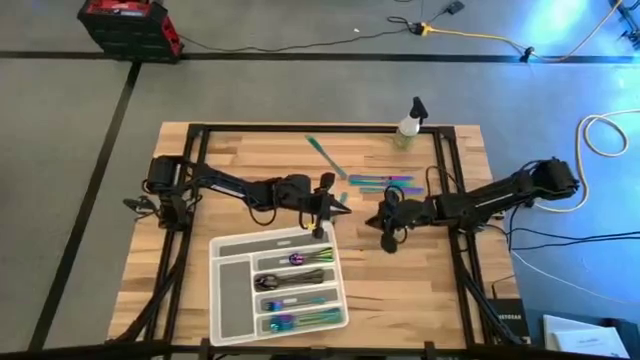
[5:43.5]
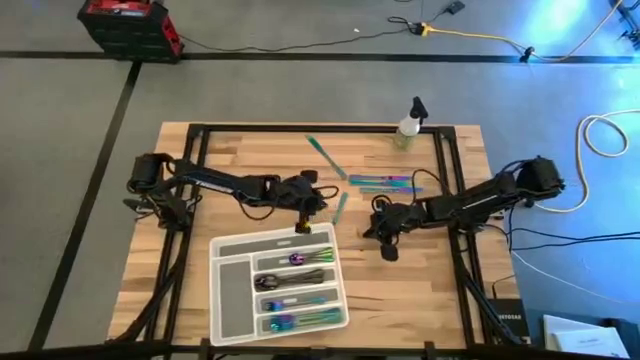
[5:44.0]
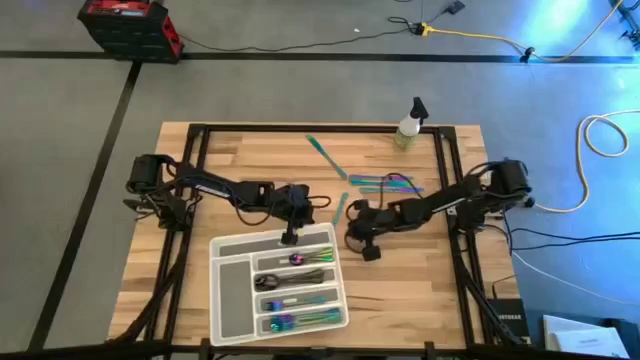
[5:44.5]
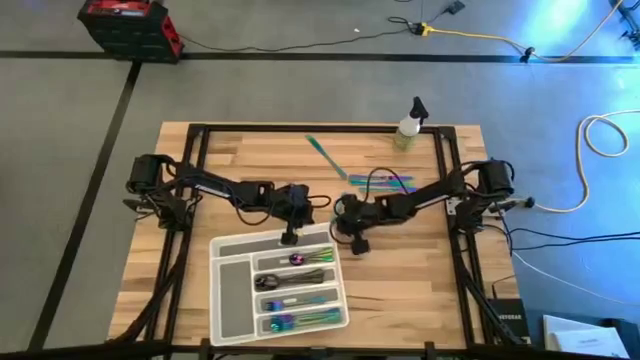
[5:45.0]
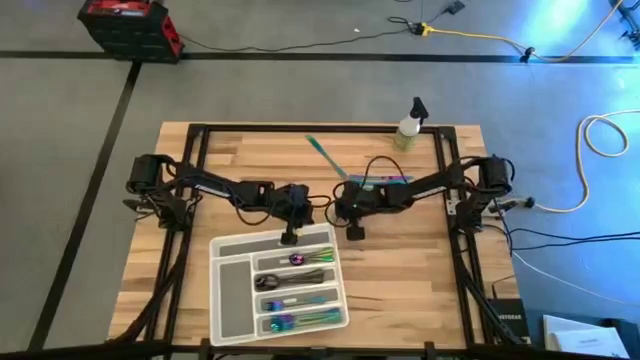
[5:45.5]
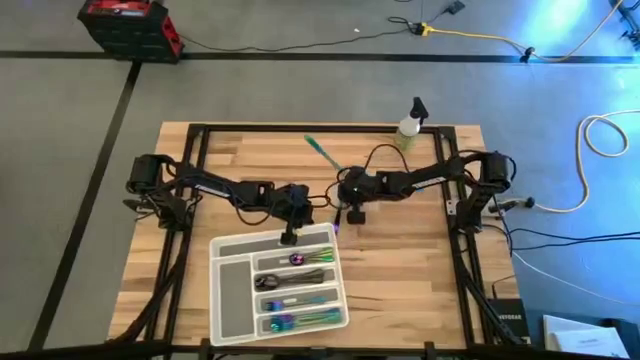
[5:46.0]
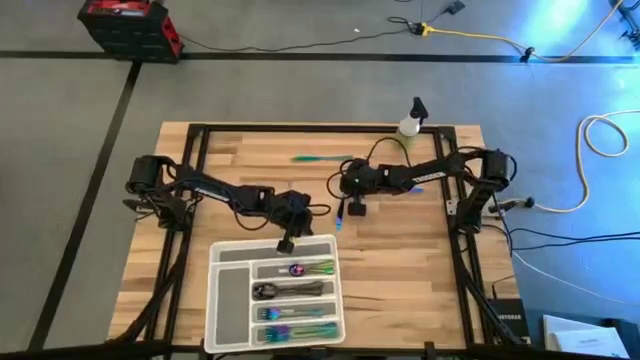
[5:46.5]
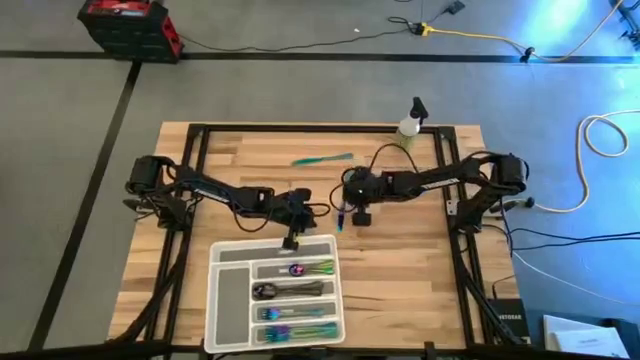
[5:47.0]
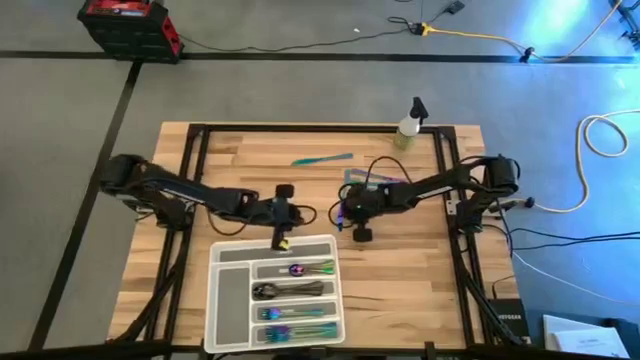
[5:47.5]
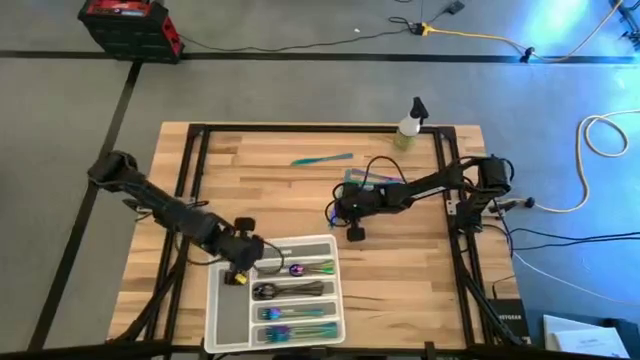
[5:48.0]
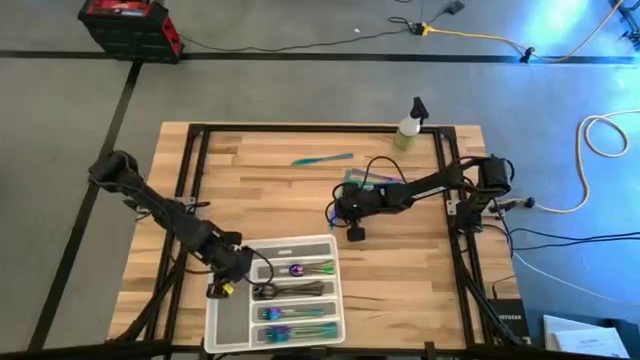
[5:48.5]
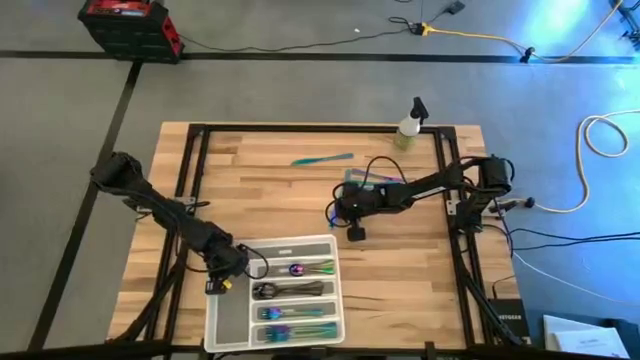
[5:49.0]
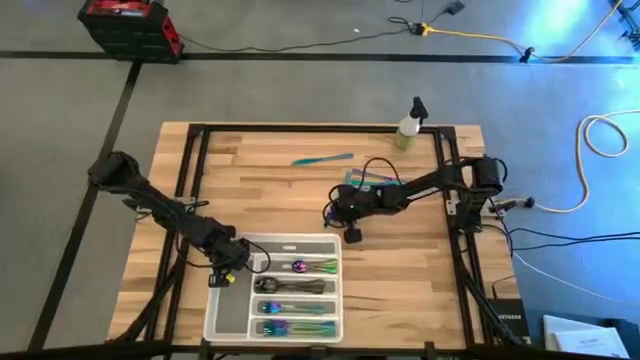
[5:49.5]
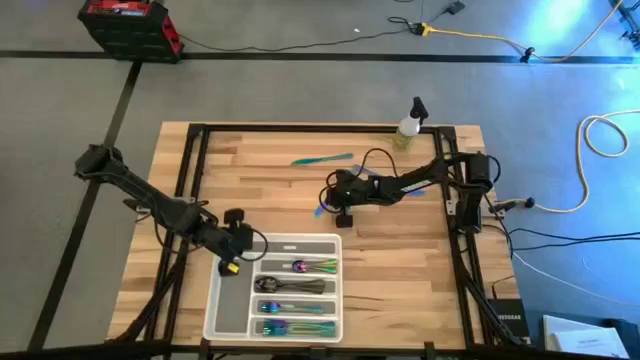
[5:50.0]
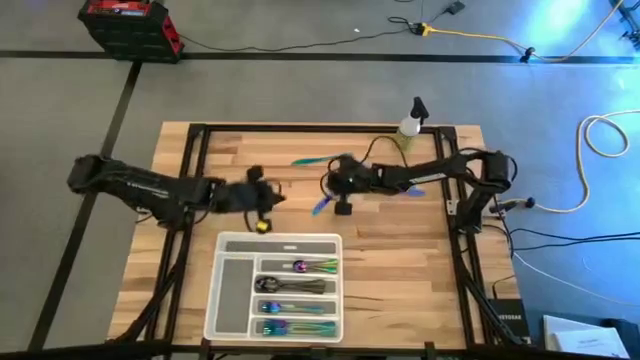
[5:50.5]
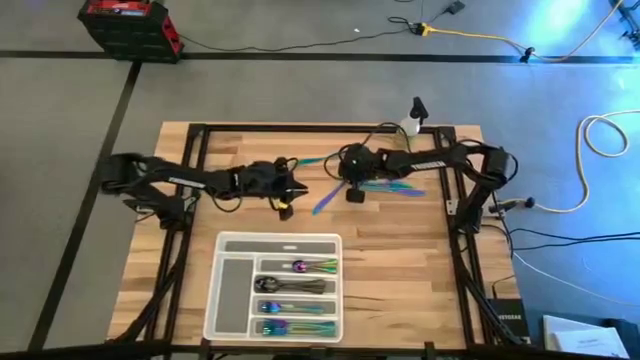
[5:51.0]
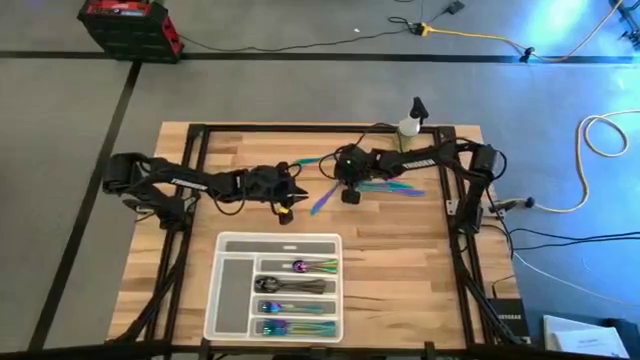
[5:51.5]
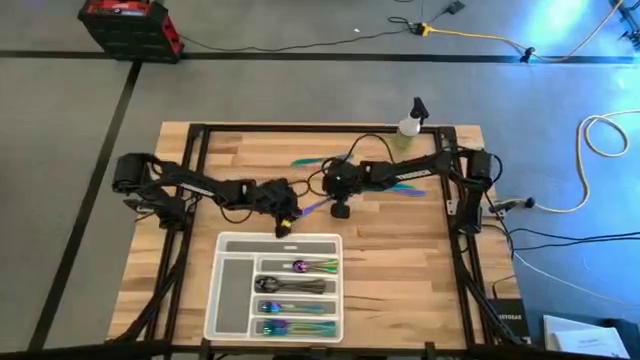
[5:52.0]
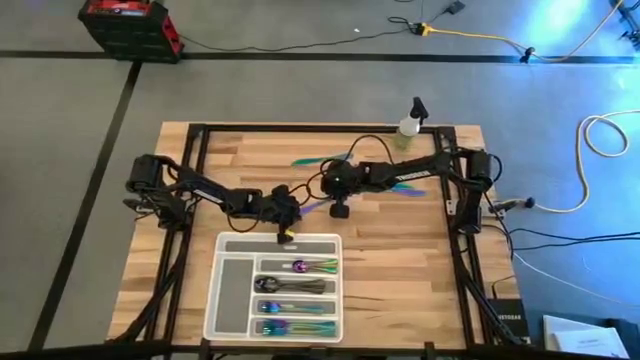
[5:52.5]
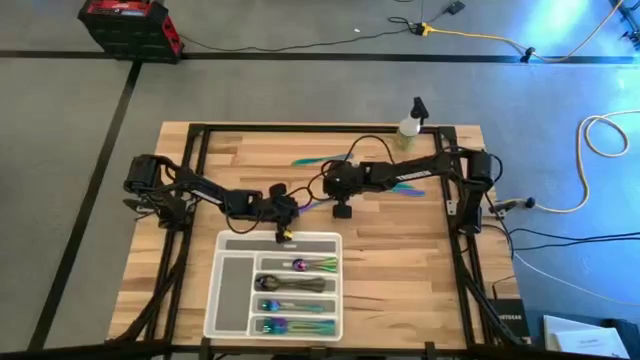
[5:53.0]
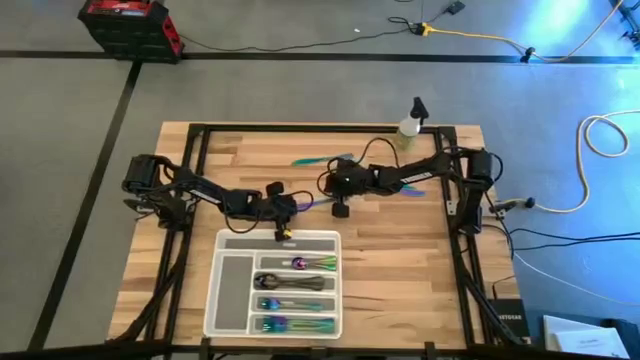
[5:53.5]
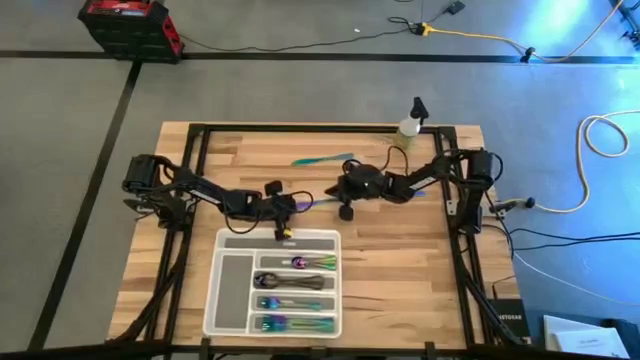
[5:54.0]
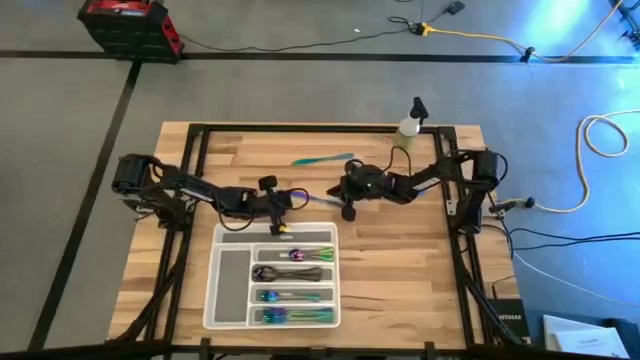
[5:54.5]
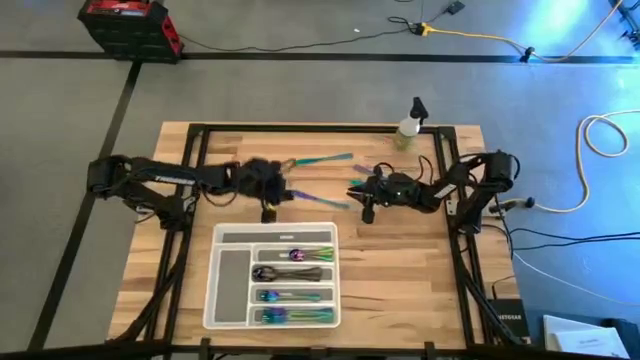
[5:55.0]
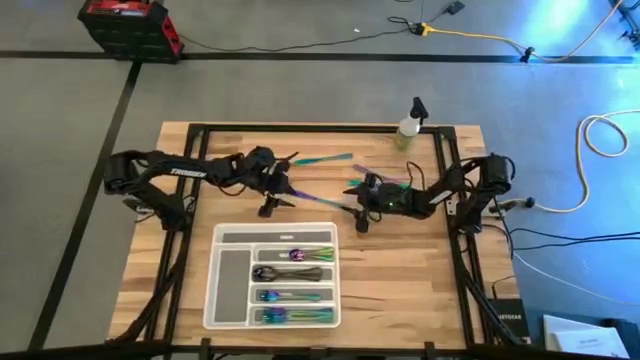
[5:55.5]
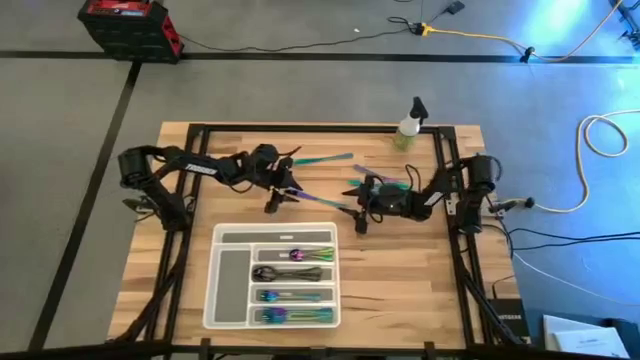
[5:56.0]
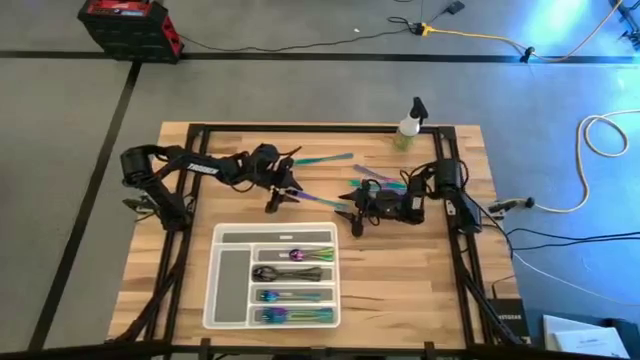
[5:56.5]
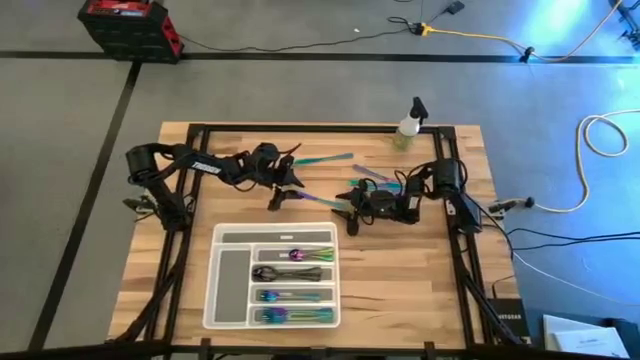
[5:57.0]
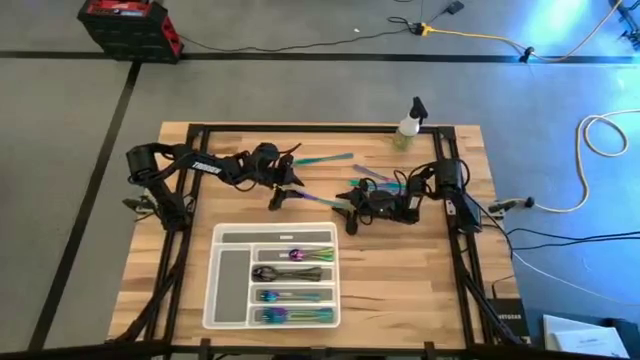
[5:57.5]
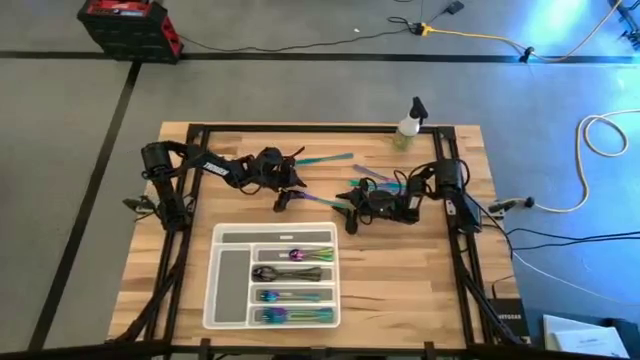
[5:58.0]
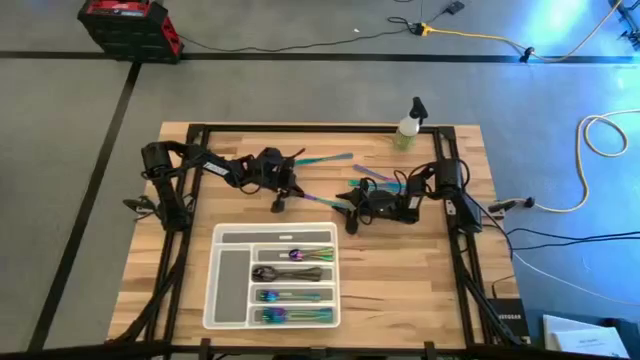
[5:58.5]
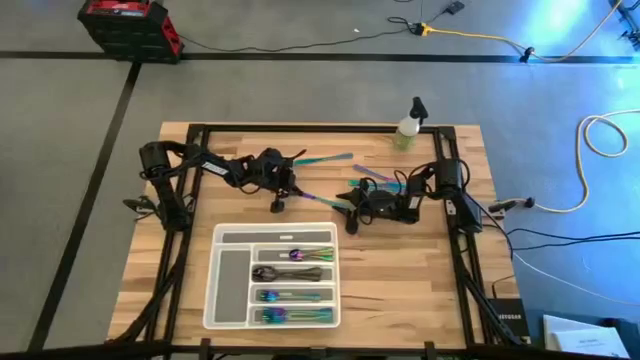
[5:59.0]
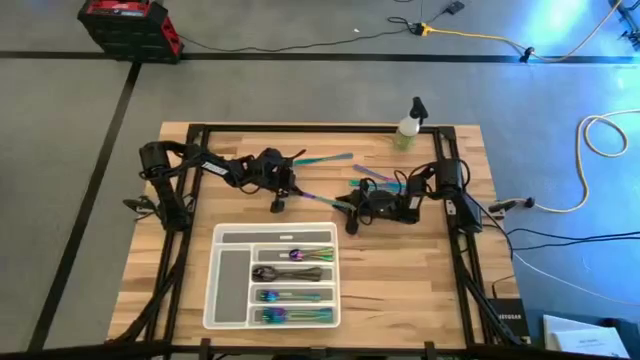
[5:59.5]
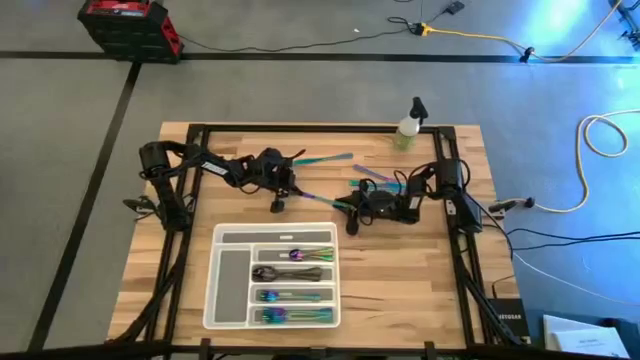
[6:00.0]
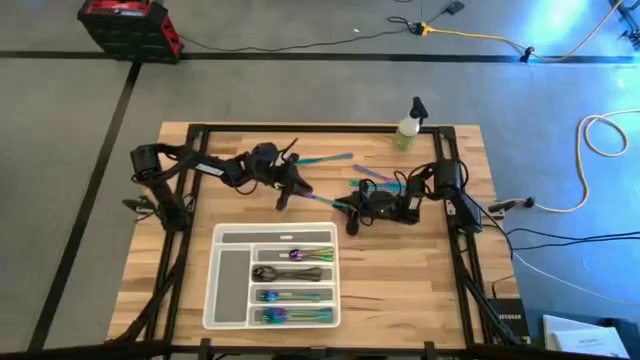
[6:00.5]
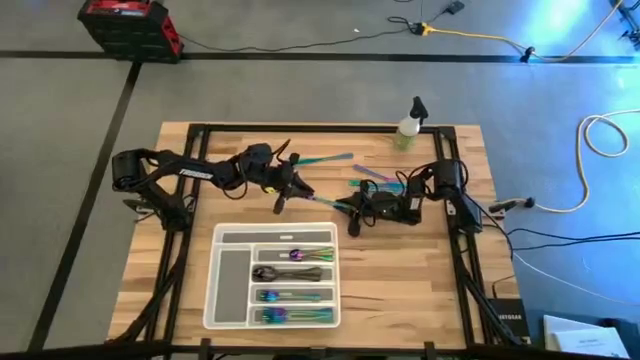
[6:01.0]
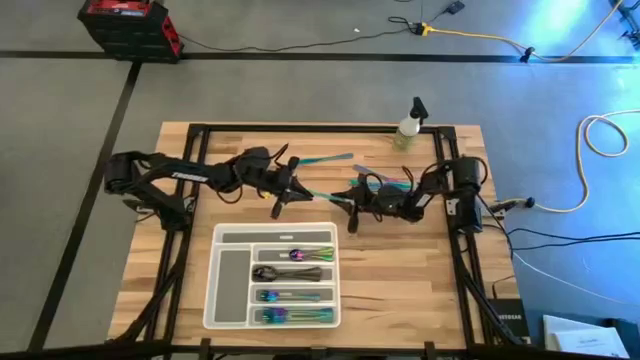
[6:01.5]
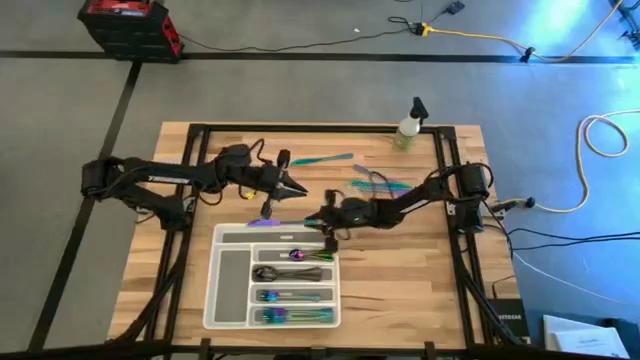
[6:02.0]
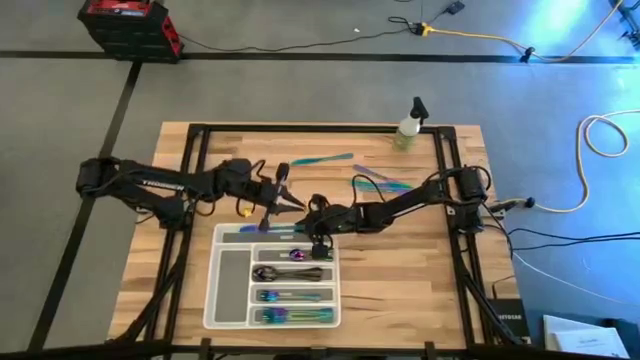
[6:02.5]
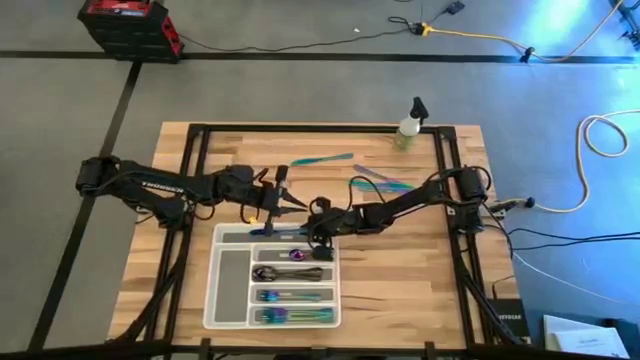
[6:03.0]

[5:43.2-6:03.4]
Task: Sort silverware
Put the blue table knife into the white silverware tray

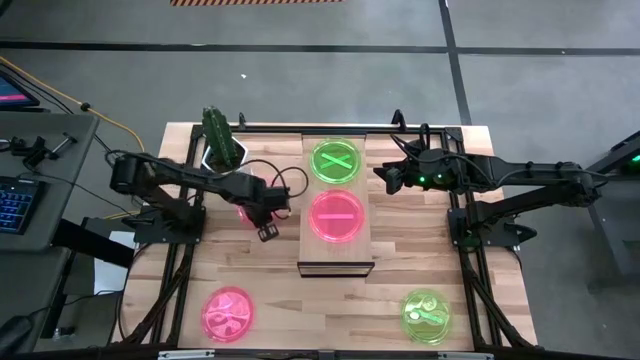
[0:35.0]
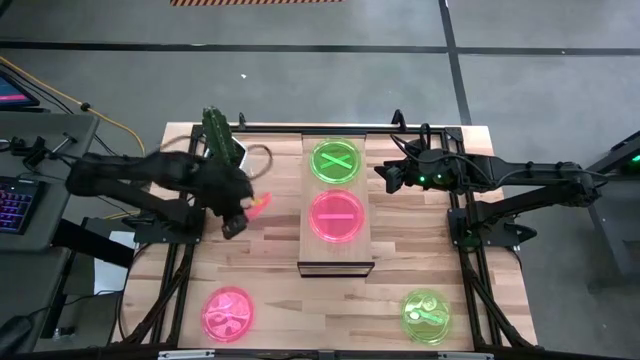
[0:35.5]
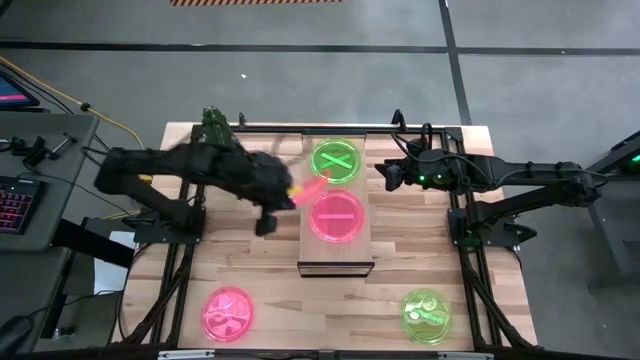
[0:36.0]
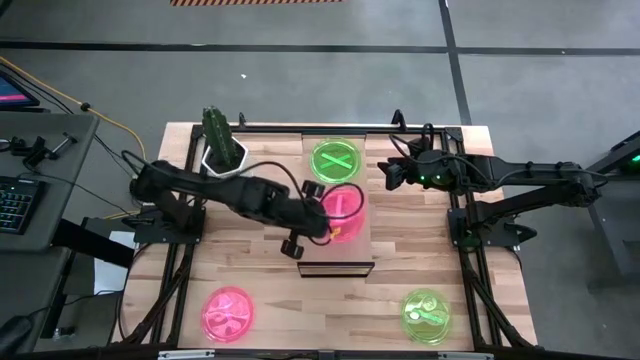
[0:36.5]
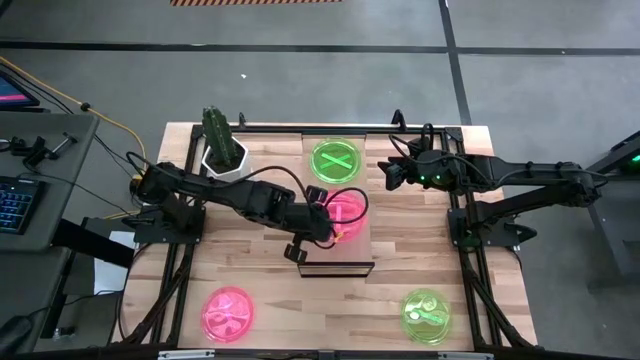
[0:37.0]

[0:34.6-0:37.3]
Task: Place and stack plates onto a shelf
Stack the top pink plate on top of the other pink plate on the shelf
